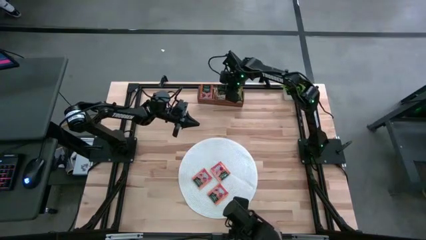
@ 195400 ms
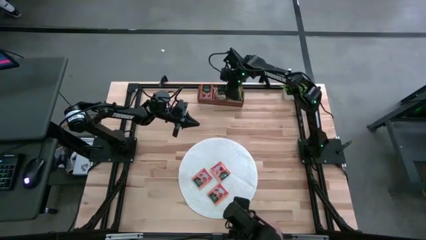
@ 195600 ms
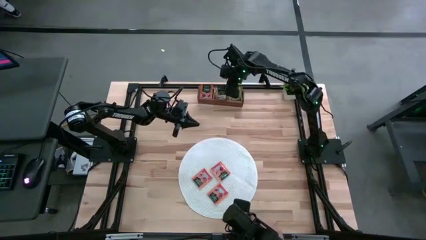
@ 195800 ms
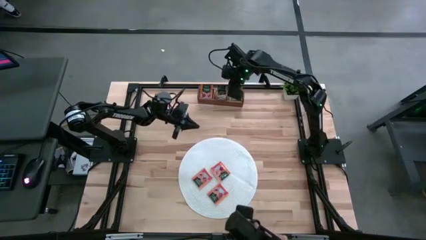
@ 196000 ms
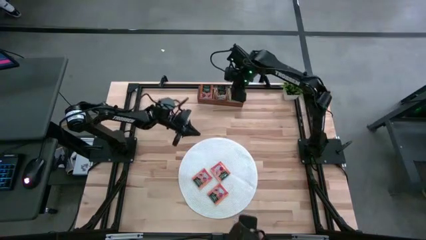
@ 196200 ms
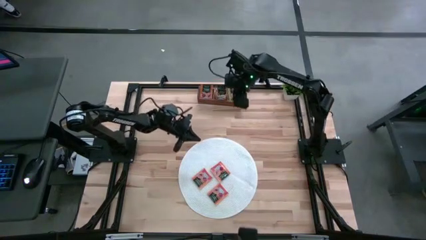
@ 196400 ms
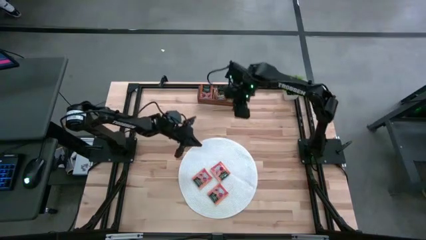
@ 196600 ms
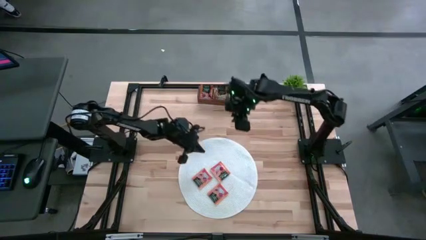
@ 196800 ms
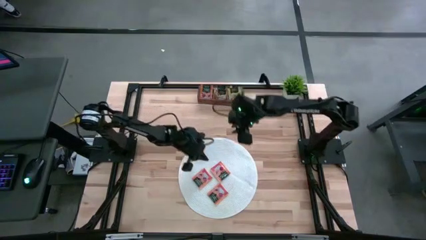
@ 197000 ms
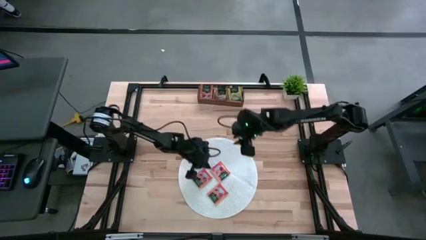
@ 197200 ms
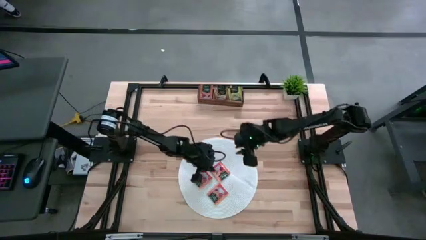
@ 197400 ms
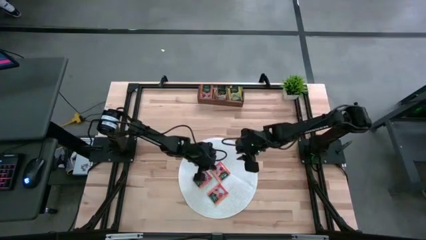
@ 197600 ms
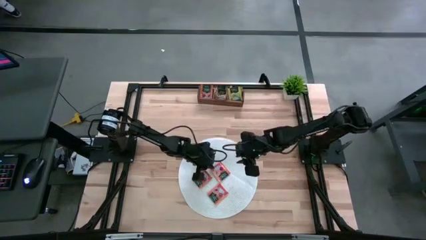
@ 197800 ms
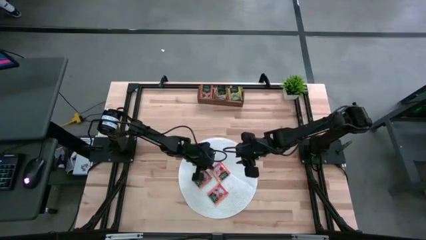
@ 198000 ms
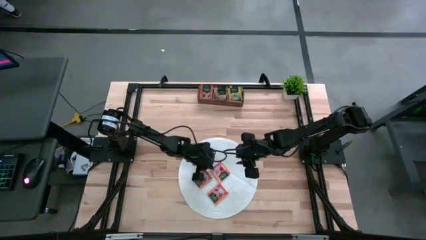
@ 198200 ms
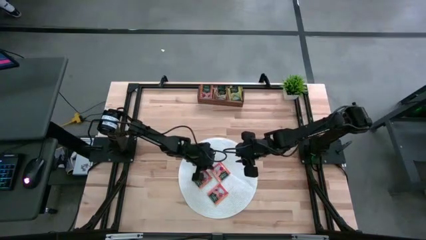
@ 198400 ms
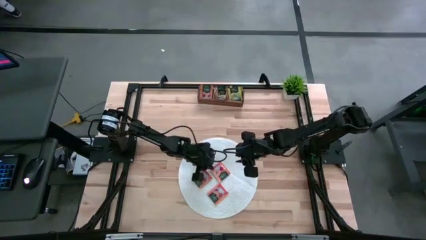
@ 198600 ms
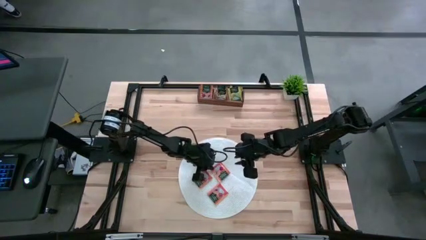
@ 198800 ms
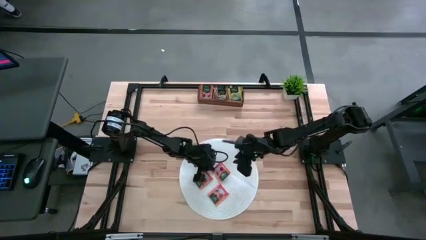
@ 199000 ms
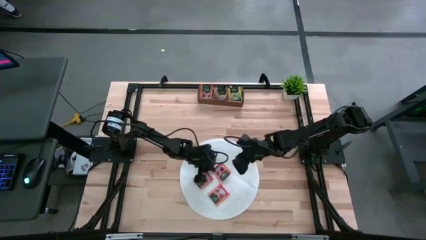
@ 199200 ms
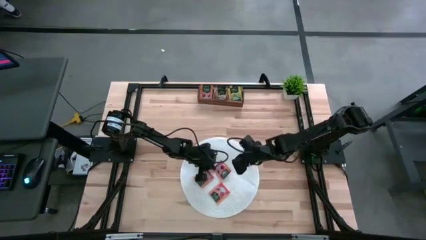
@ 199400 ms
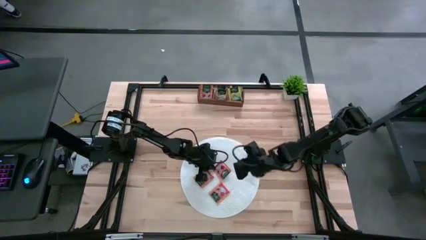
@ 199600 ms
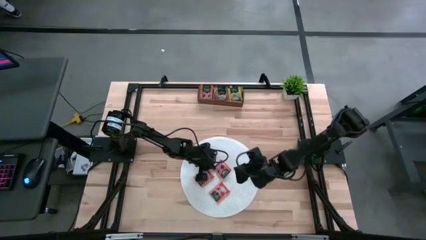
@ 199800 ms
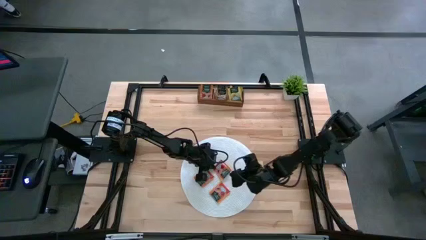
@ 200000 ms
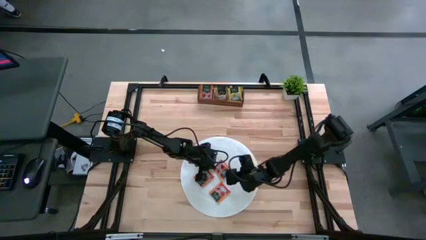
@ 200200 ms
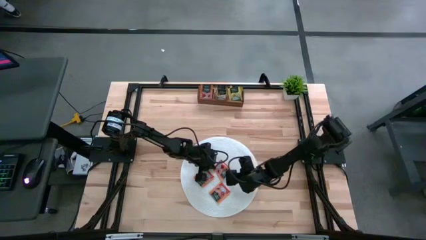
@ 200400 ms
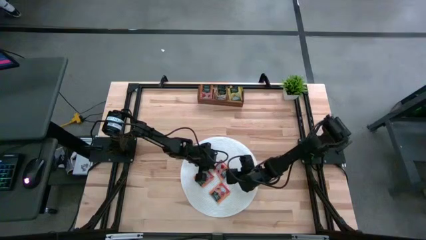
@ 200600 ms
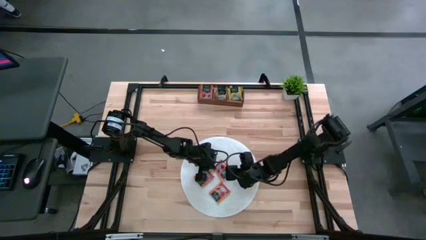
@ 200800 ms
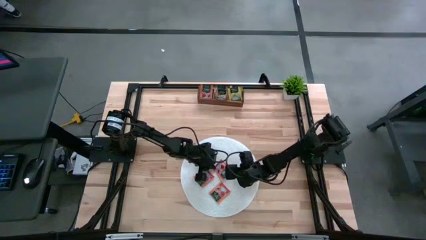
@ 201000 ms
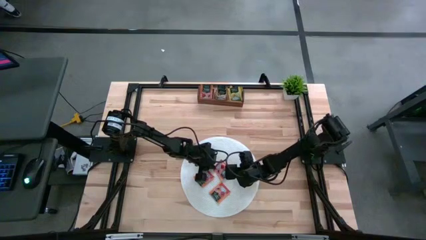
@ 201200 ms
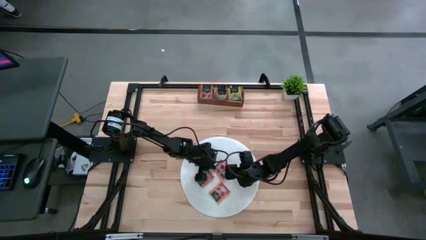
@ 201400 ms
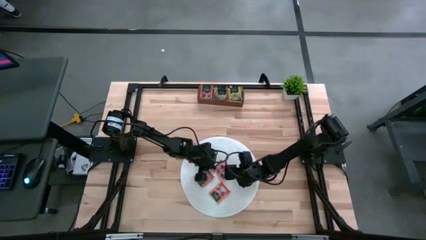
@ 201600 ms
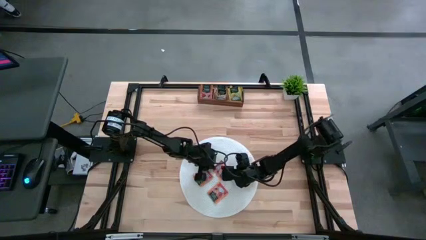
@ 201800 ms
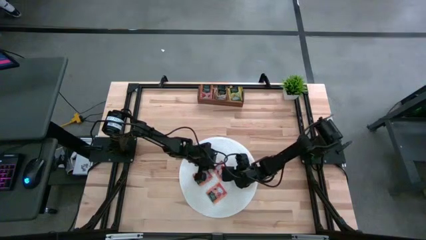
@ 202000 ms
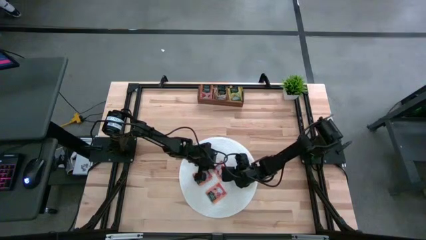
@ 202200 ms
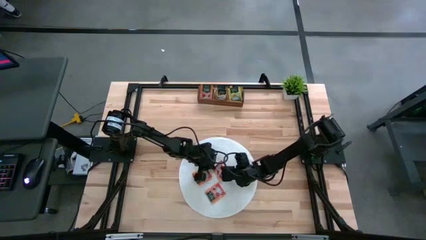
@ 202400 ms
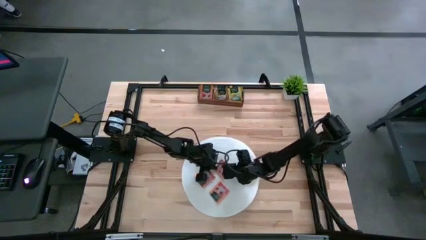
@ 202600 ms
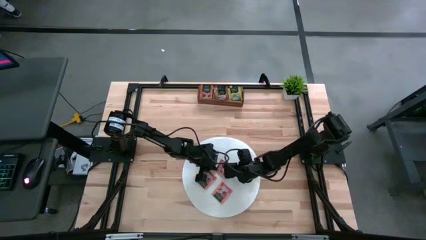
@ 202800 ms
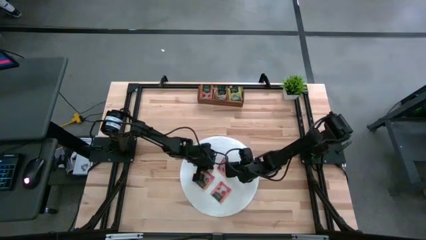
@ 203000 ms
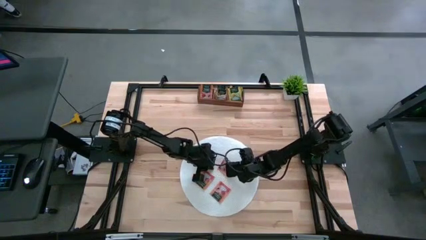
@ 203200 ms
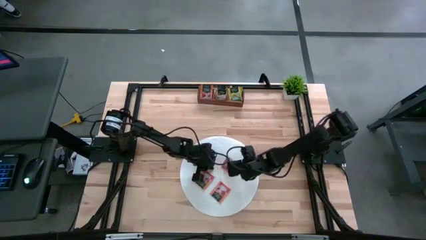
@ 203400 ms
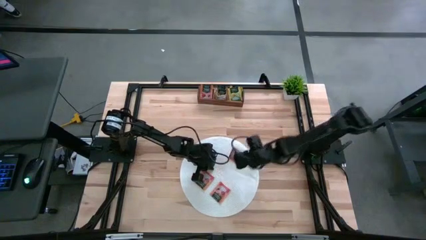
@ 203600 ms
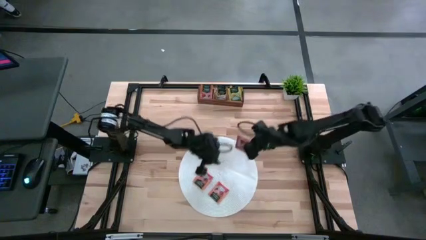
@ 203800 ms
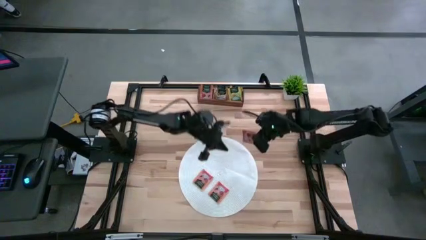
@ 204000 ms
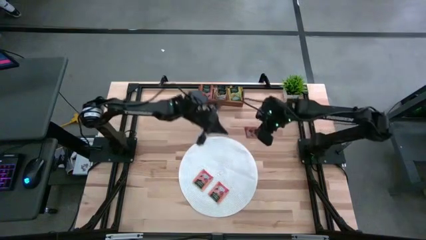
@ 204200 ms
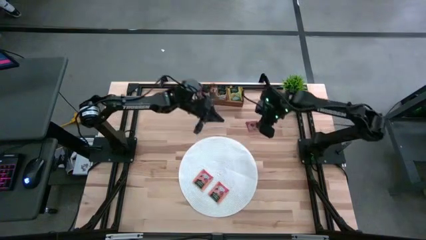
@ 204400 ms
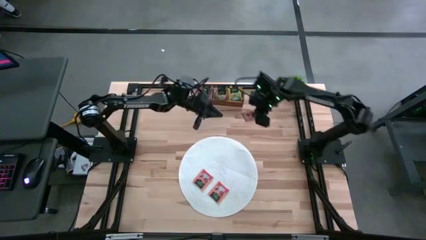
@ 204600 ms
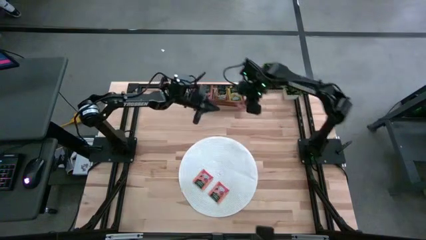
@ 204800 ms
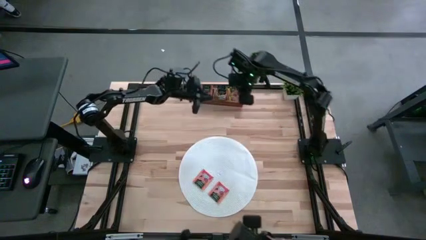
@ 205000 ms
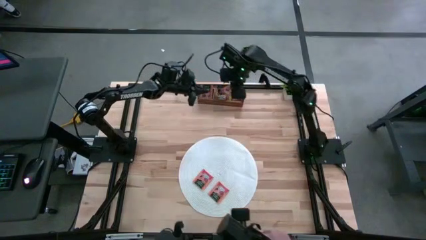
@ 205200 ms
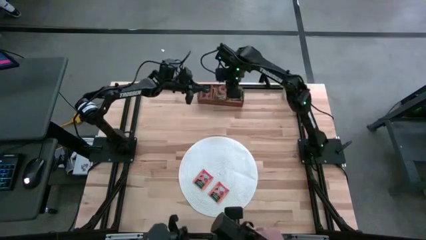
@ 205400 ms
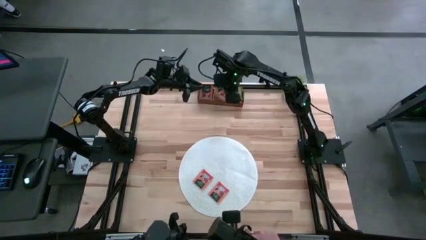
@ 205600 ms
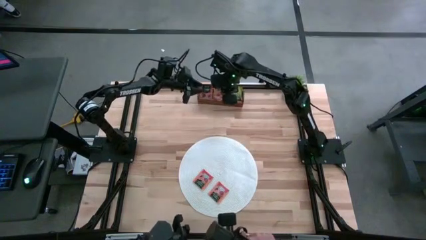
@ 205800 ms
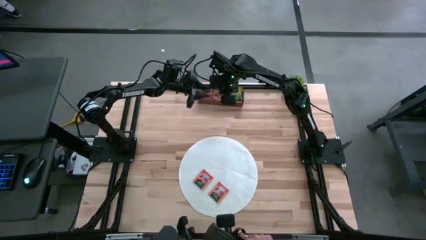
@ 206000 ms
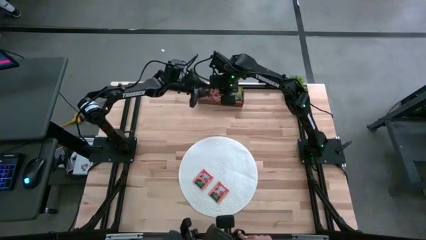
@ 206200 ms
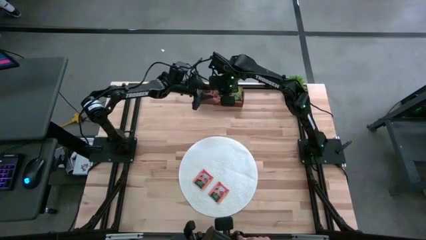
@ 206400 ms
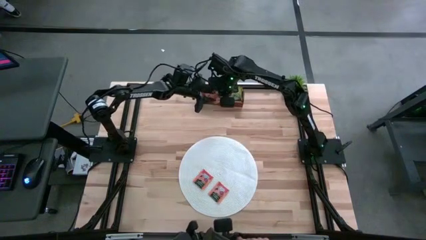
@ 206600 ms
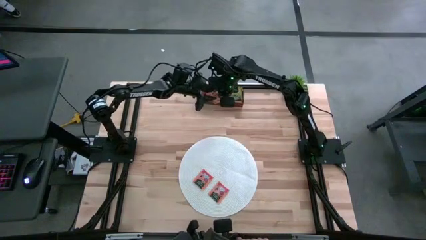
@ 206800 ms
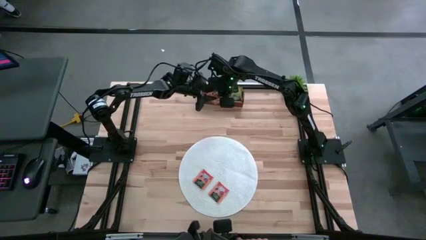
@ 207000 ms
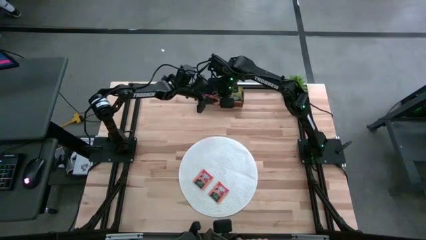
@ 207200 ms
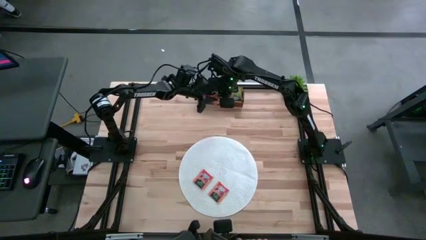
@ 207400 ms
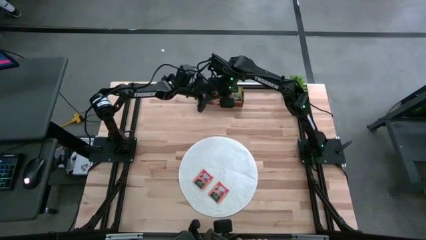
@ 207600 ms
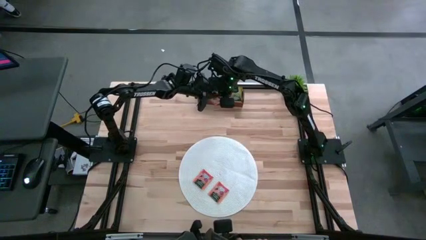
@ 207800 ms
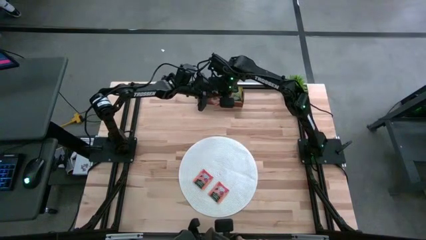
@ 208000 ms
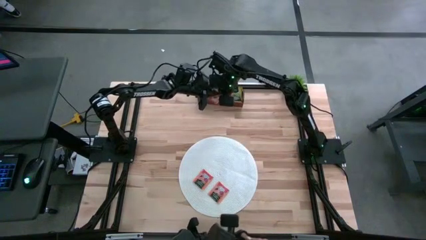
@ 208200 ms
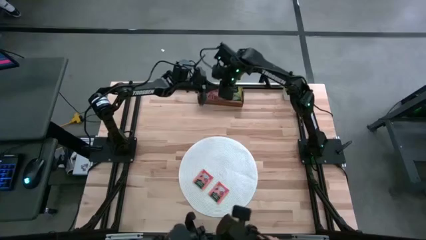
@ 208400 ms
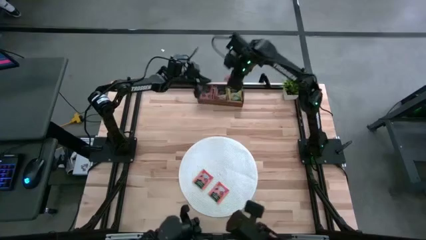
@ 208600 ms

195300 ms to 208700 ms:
Task: Pick & Place Tea
Put the orange tea bag into the left section of the wooden organizer

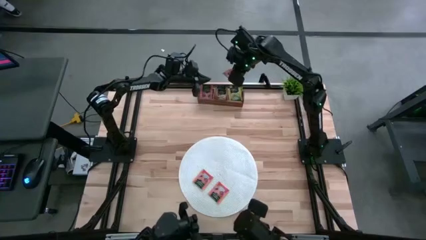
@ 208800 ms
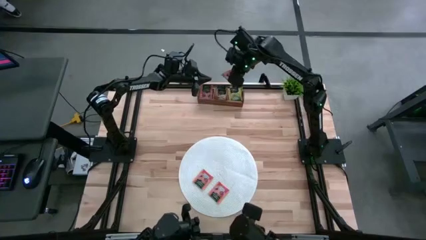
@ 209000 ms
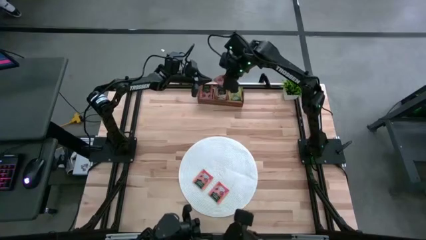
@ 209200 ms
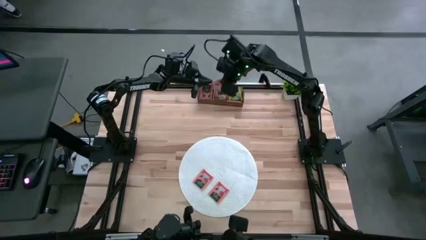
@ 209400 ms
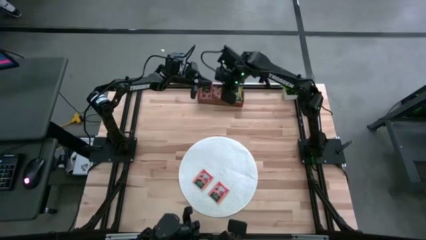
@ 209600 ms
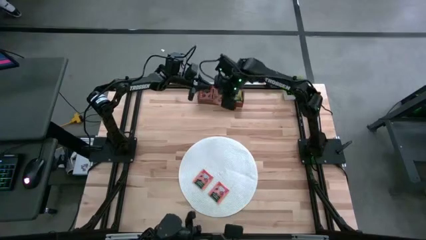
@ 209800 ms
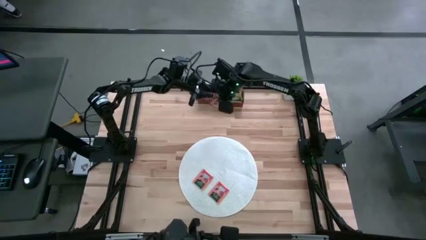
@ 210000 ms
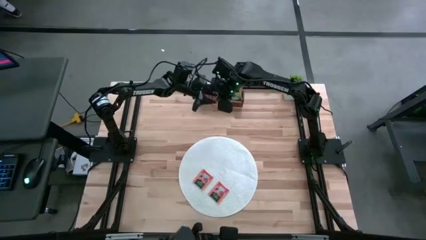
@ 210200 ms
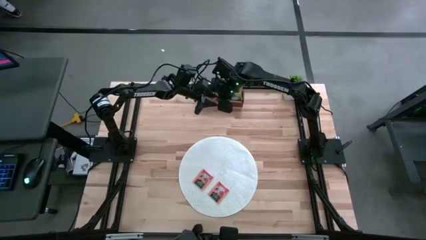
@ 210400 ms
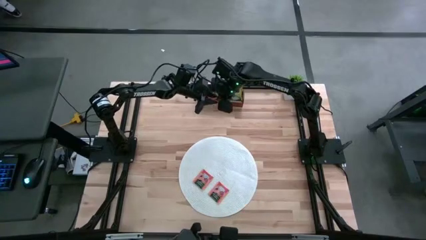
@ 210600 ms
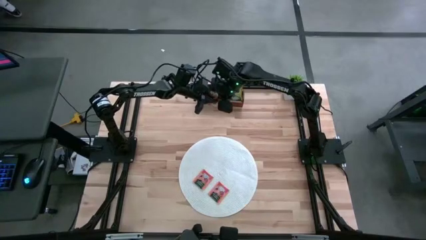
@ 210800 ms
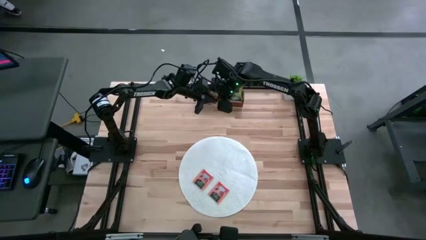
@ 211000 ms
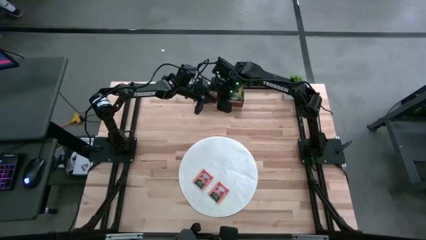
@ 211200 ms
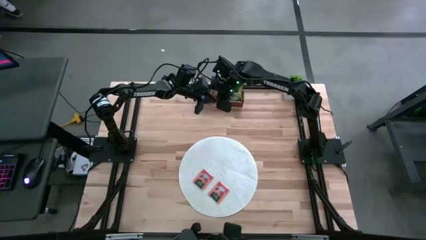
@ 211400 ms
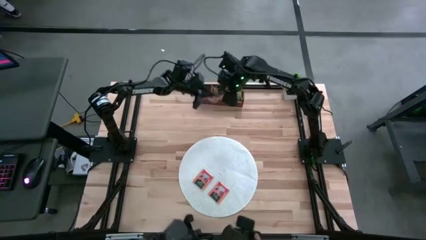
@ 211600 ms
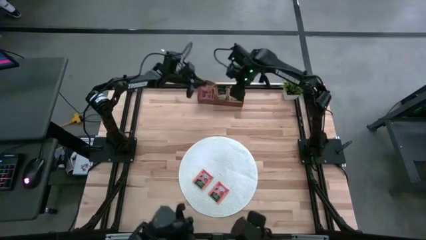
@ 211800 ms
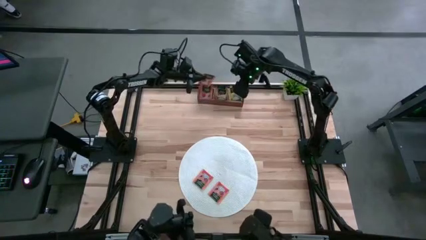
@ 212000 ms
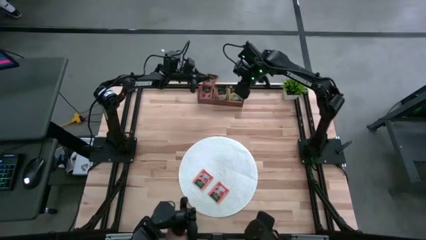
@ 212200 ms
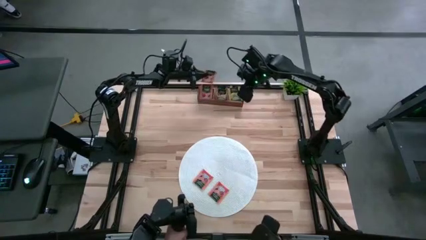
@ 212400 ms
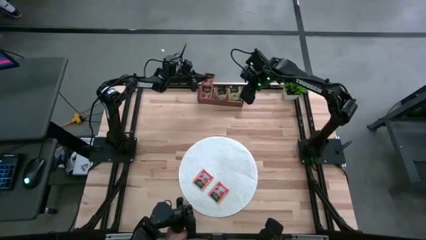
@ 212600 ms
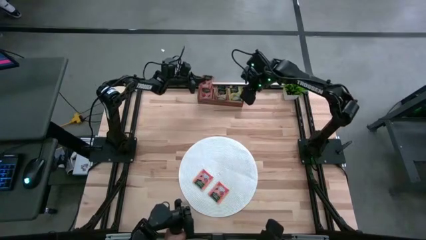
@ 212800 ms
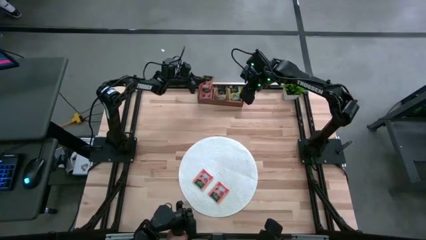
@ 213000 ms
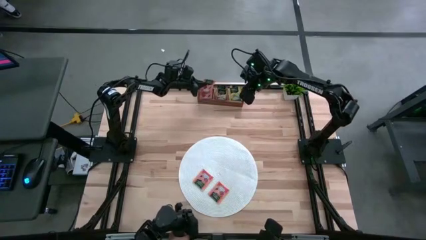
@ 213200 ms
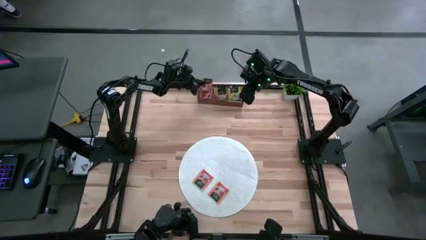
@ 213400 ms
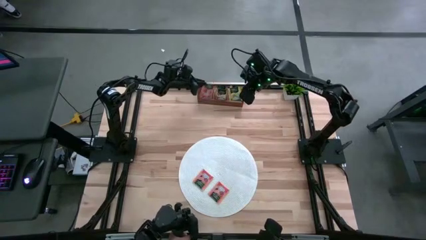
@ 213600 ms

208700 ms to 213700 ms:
Put the orange tea bag into the left section of the wooden organizer
